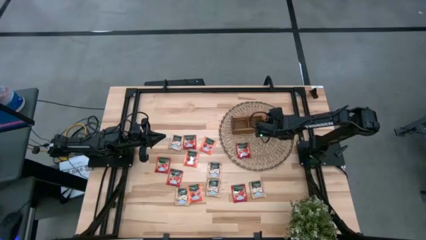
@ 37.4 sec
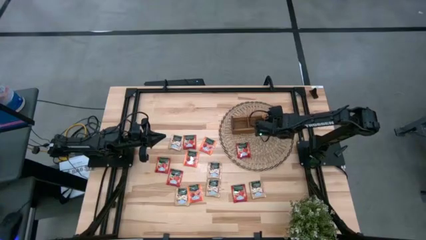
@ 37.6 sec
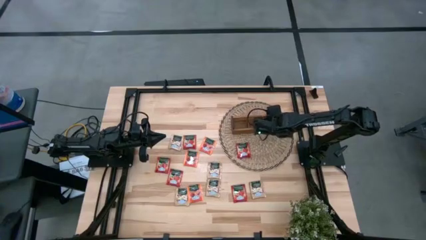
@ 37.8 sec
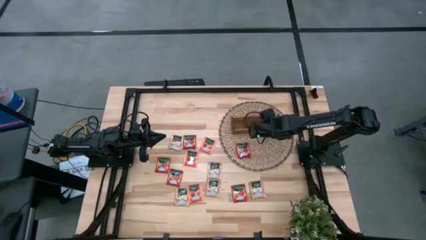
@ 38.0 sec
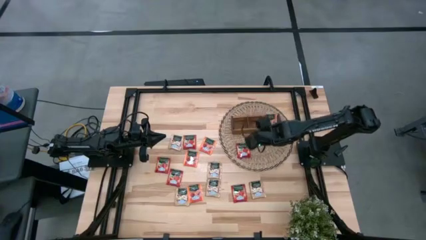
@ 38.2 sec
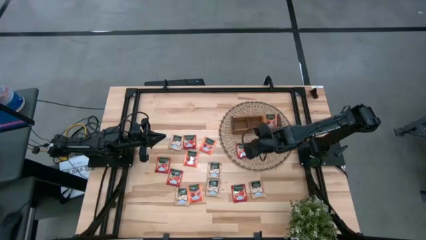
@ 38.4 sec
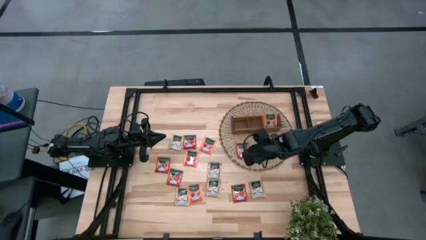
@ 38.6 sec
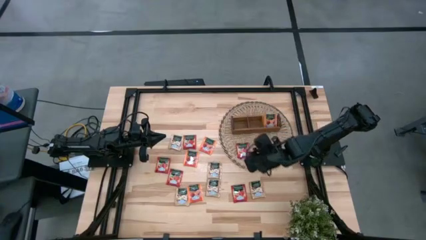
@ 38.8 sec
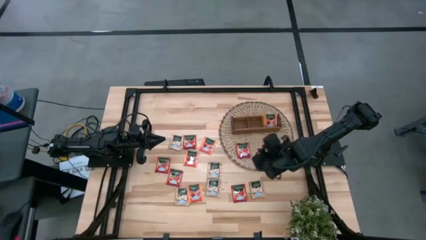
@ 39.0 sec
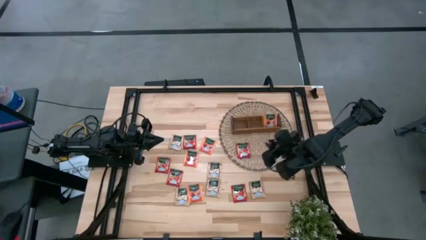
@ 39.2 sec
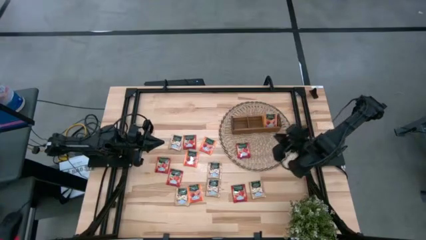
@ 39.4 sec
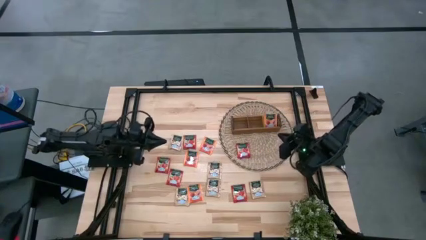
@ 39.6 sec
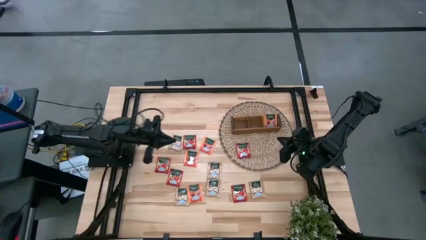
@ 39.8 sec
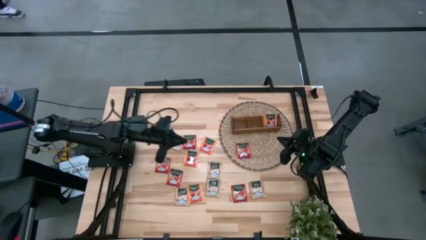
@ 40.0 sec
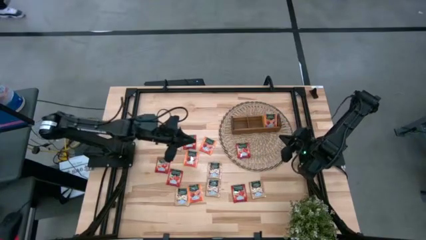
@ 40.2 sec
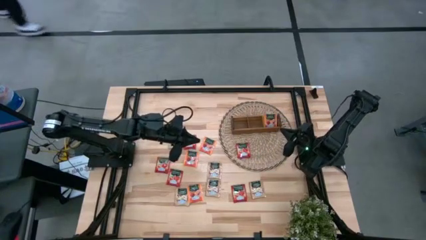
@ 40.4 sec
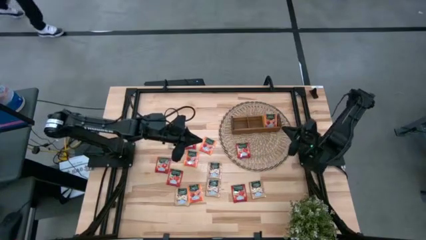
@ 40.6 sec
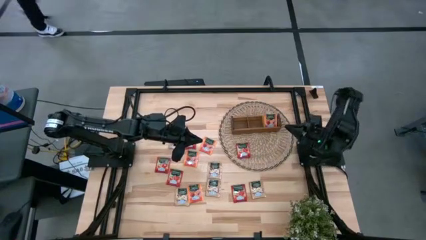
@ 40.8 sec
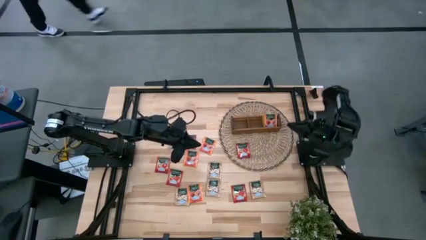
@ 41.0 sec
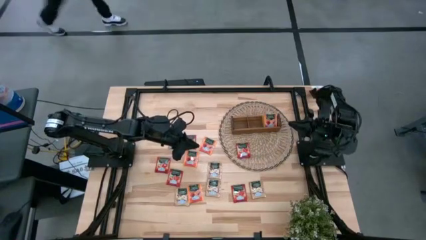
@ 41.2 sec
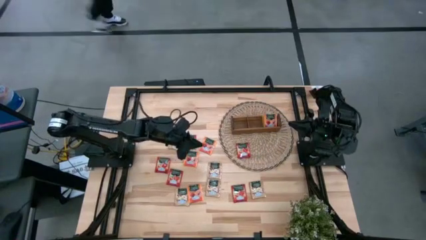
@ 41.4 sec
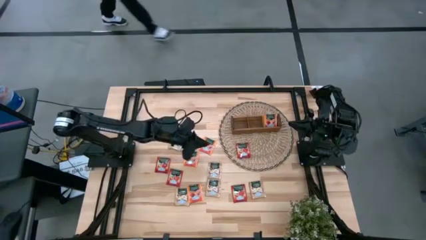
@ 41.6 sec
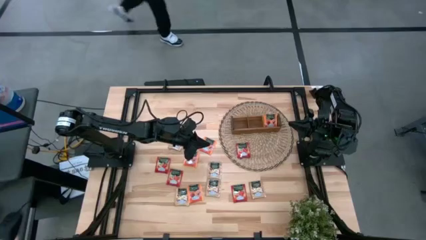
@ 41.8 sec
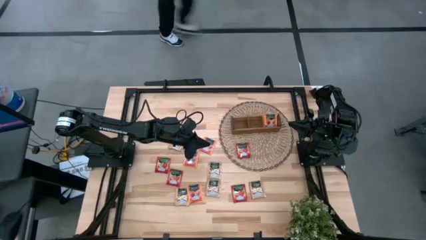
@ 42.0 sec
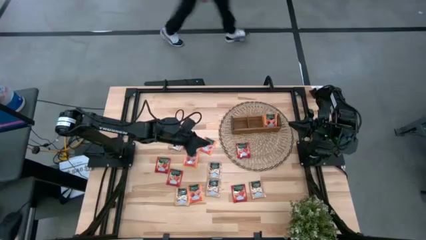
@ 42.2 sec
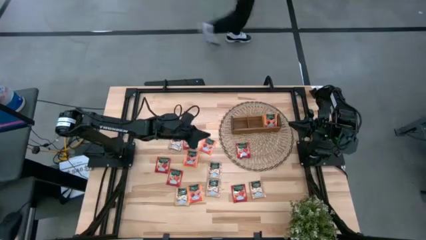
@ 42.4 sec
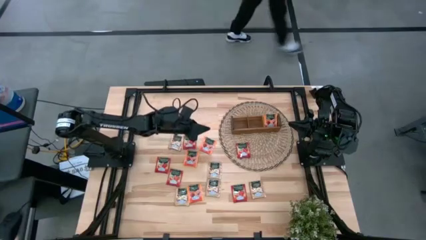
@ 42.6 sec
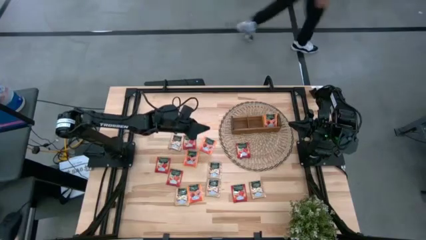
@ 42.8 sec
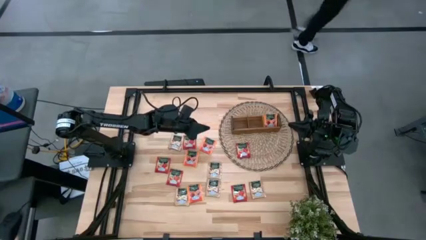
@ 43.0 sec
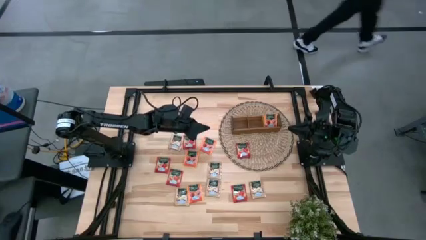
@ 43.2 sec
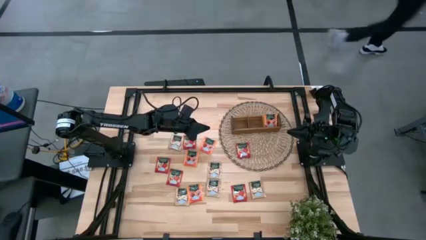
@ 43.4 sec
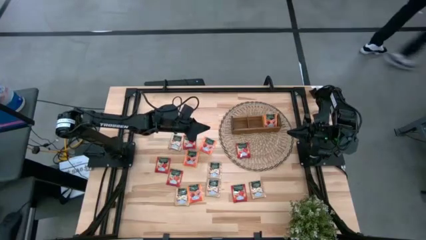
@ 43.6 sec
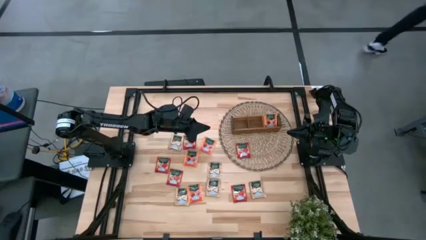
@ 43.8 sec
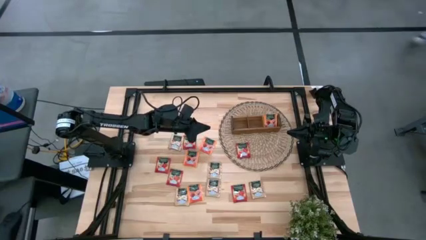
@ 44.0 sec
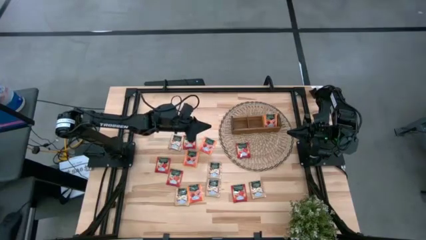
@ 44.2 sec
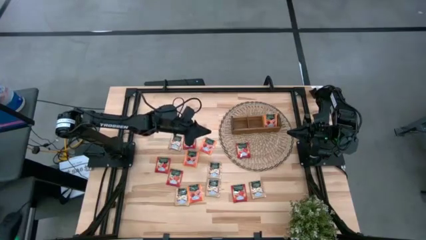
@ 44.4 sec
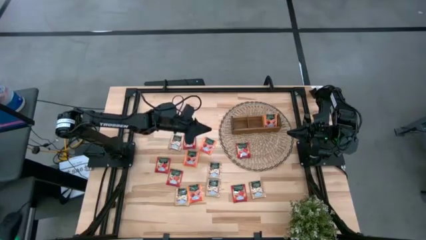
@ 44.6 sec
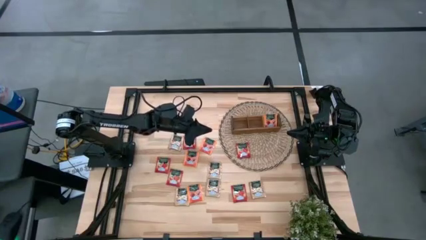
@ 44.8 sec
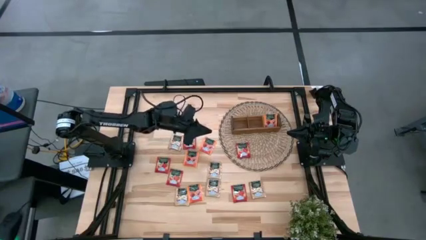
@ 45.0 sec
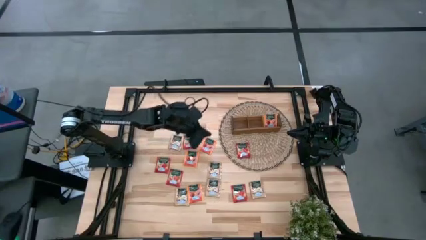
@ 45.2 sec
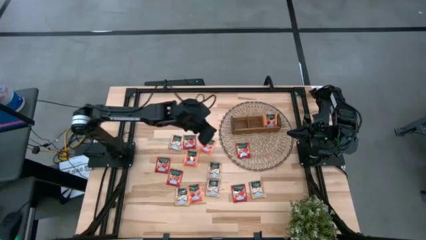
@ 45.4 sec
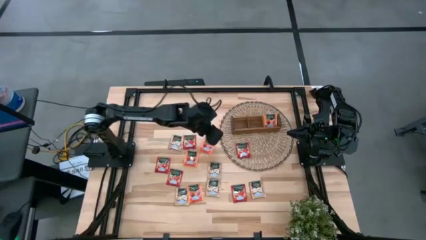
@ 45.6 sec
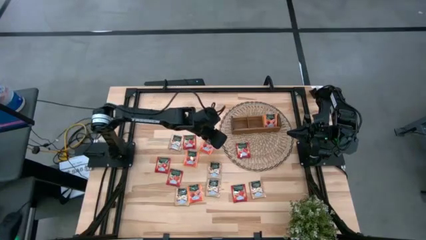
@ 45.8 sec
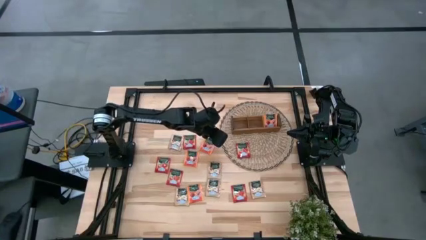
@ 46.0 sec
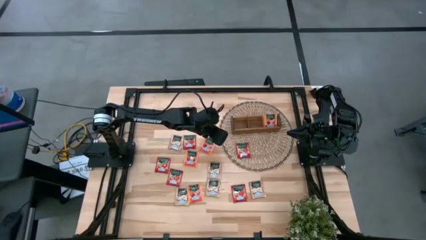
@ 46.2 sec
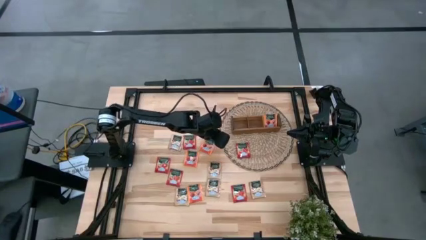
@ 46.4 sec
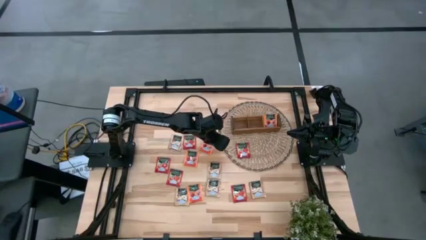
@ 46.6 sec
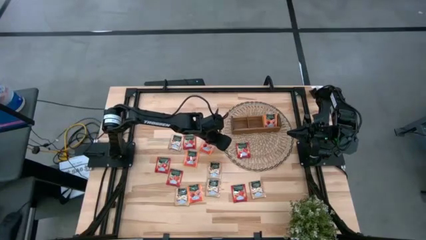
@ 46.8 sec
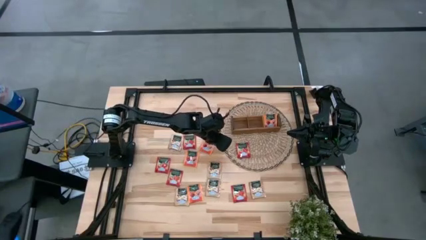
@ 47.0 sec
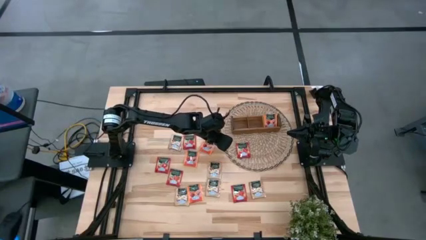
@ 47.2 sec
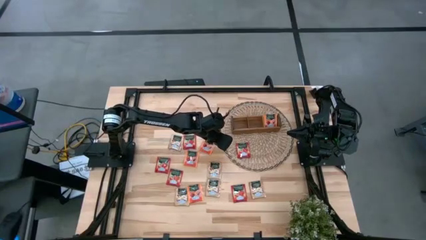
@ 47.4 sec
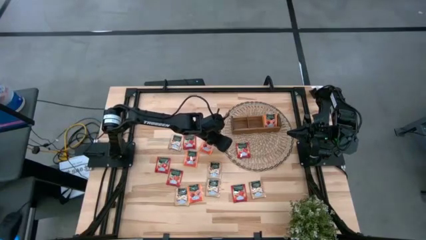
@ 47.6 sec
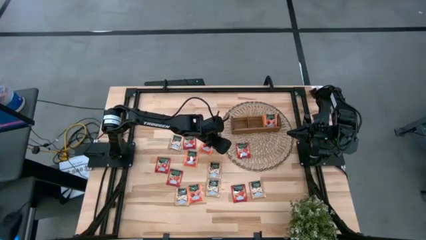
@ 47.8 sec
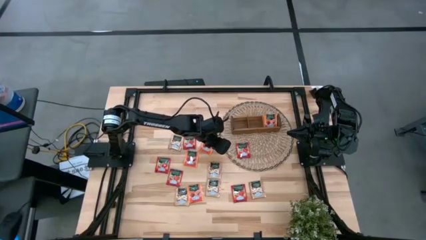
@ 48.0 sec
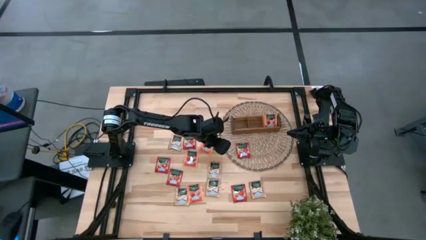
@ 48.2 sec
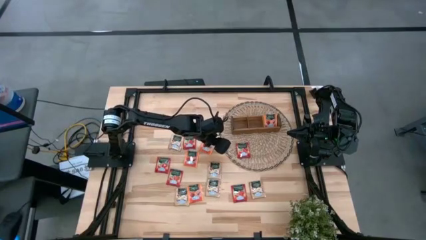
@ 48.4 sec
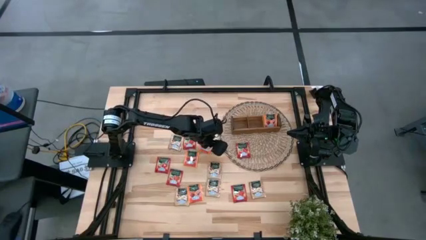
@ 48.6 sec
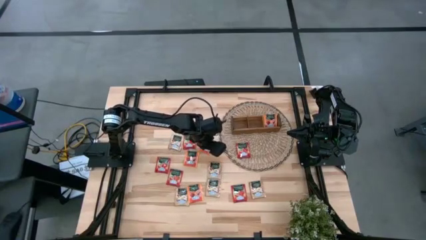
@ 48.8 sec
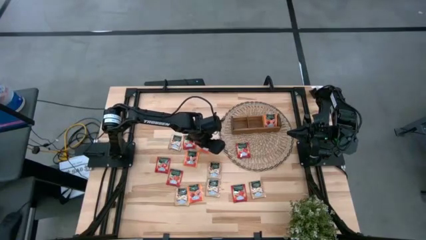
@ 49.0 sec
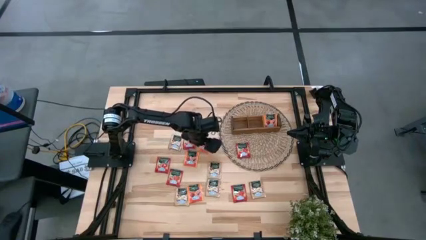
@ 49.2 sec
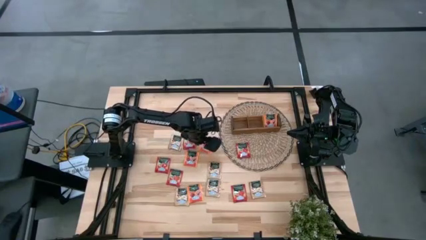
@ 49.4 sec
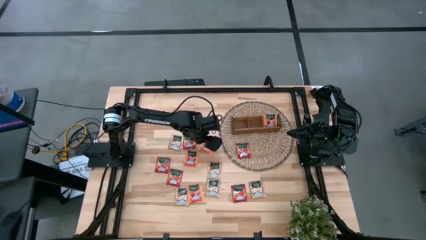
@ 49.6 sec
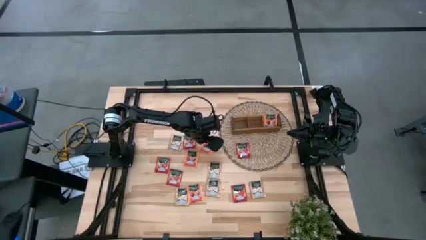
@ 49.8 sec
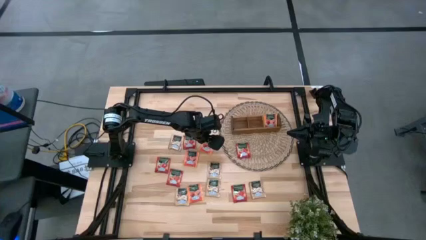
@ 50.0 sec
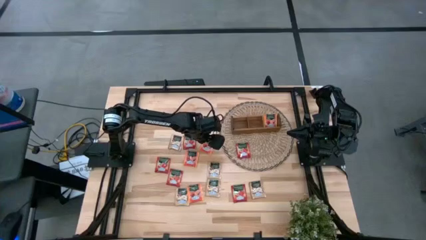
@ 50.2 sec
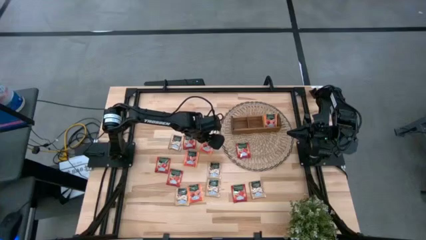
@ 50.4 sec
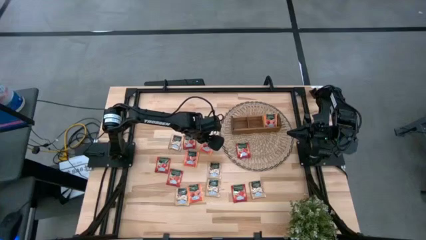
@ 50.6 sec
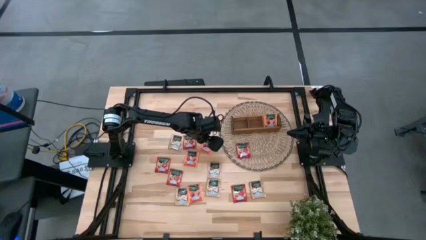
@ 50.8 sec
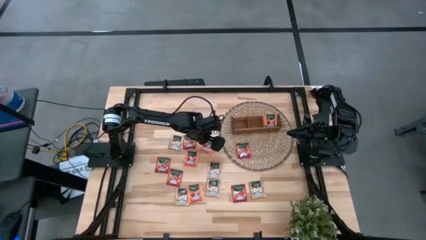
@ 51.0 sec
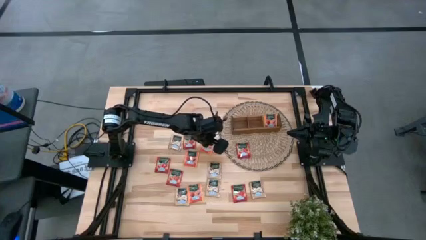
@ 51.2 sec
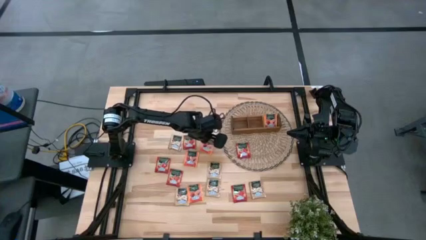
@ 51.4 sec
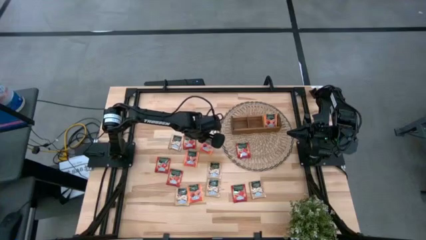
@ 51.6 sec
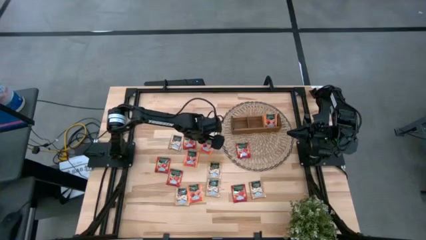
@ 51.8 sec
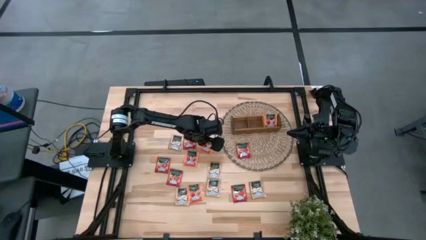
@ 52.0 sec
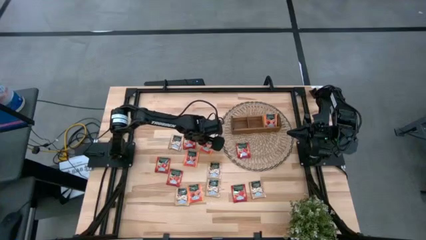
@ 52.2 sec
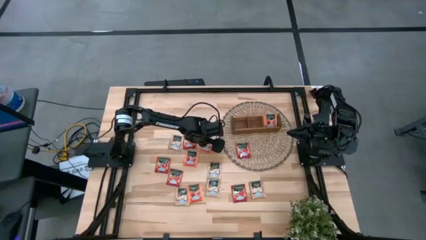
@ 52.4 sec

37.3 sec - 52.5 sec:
Task: Pick & Place Tea
Put the orange tea pack into the right compartment of the brown organizer
